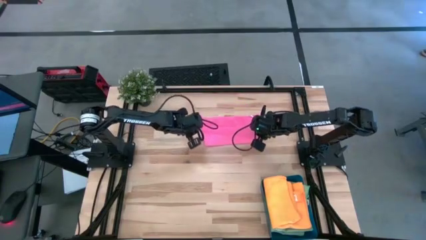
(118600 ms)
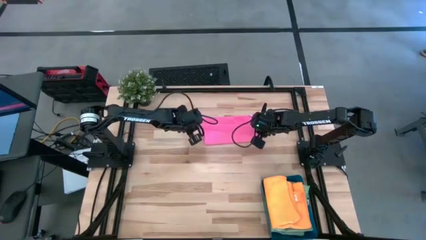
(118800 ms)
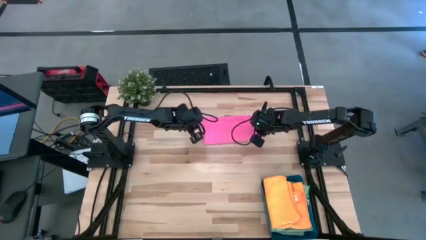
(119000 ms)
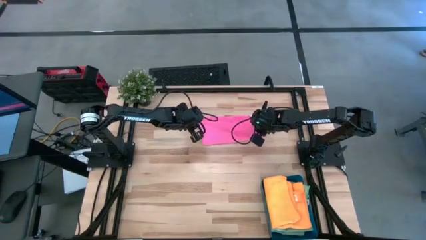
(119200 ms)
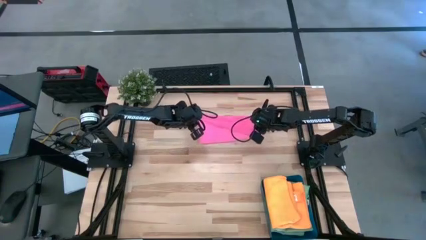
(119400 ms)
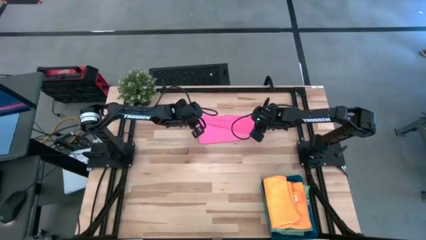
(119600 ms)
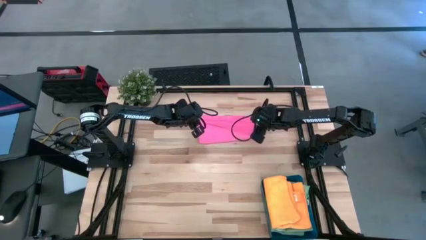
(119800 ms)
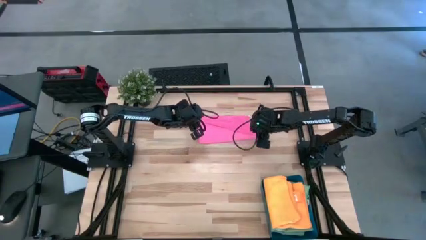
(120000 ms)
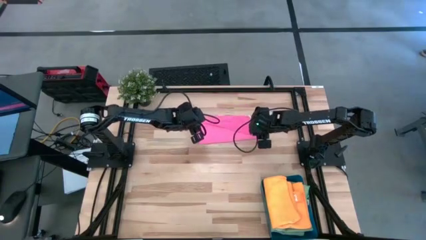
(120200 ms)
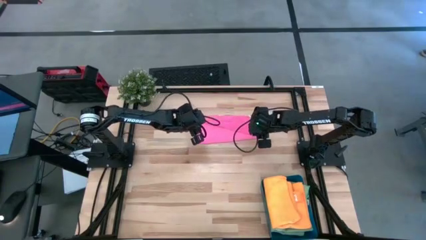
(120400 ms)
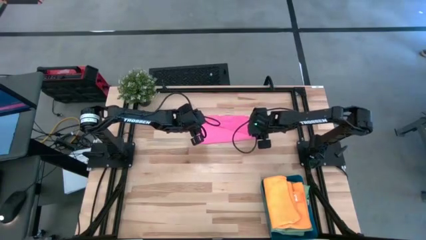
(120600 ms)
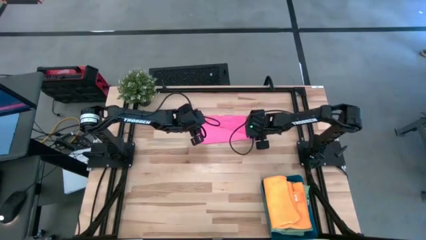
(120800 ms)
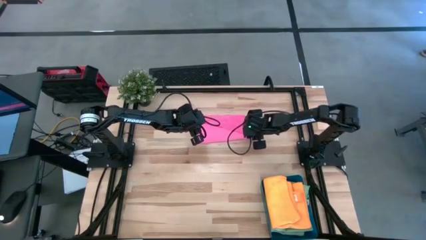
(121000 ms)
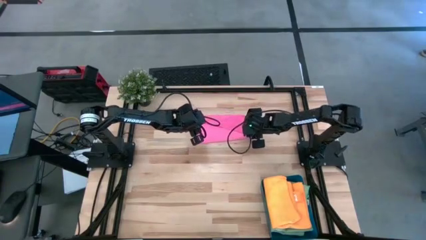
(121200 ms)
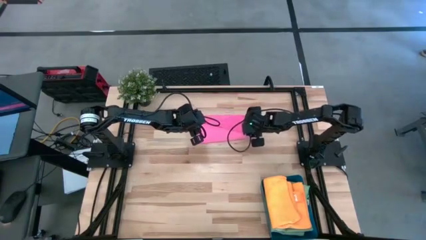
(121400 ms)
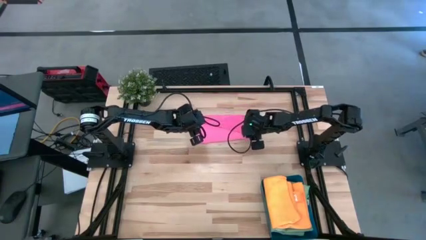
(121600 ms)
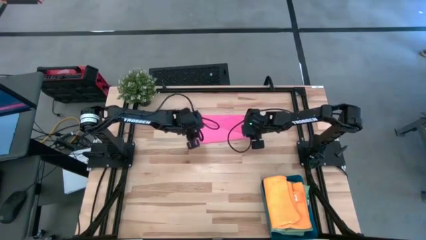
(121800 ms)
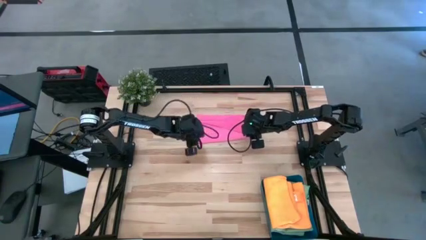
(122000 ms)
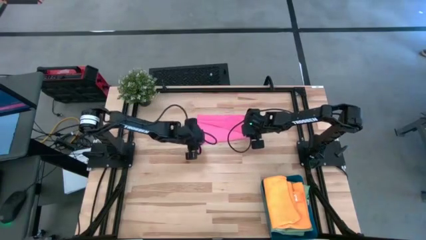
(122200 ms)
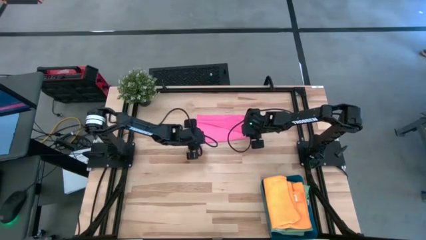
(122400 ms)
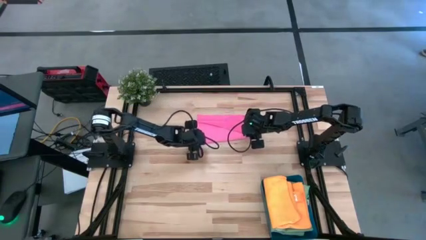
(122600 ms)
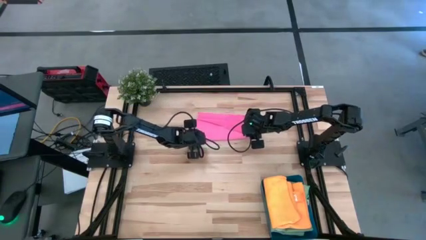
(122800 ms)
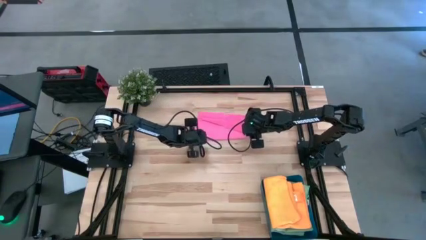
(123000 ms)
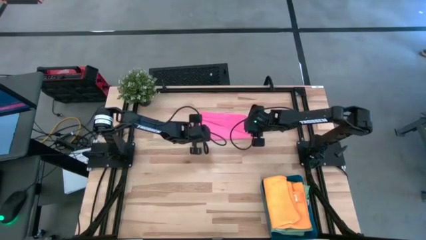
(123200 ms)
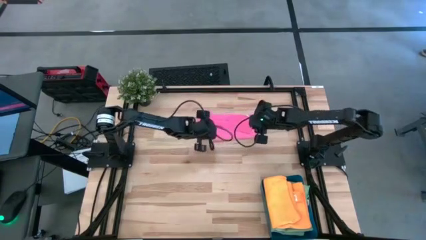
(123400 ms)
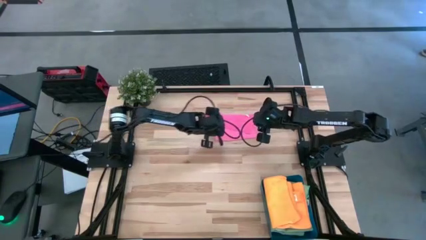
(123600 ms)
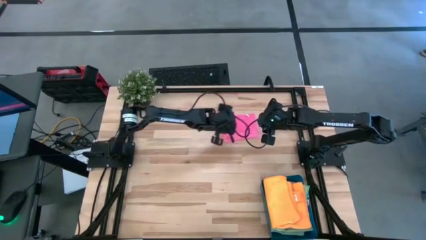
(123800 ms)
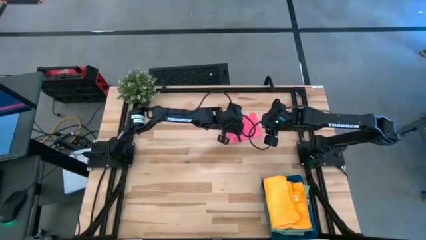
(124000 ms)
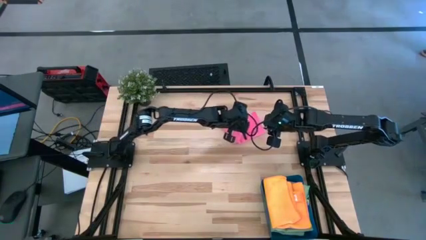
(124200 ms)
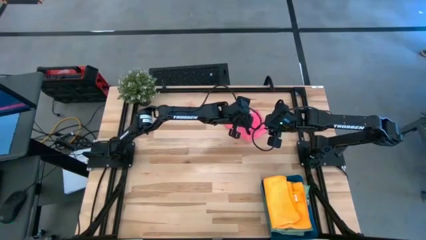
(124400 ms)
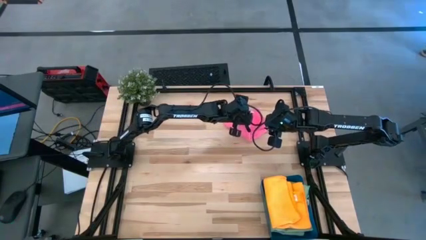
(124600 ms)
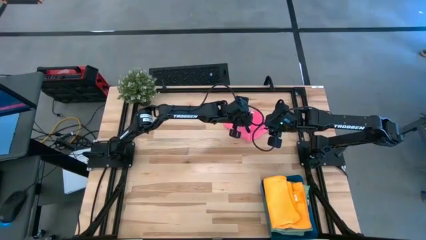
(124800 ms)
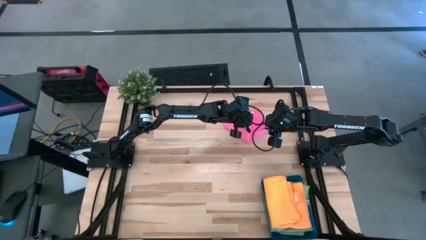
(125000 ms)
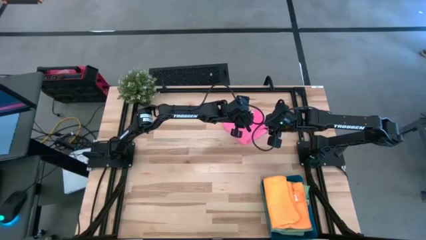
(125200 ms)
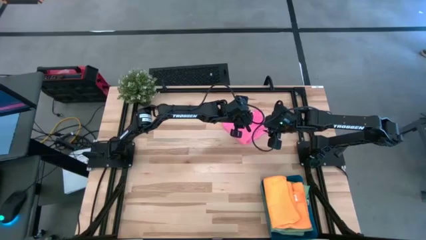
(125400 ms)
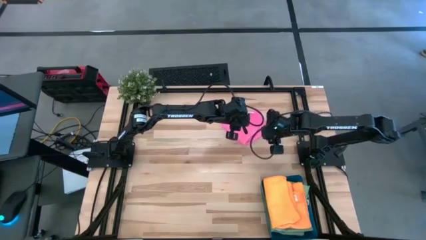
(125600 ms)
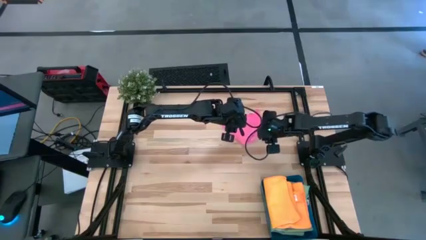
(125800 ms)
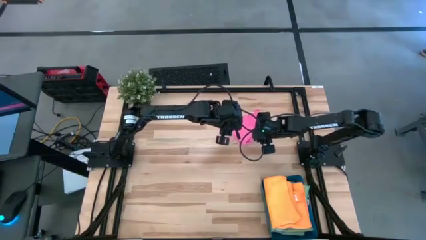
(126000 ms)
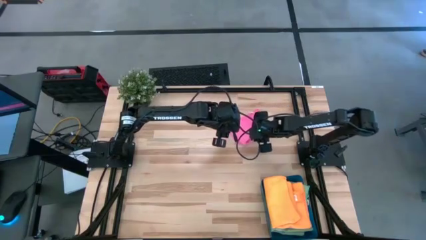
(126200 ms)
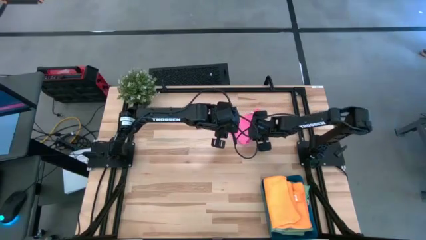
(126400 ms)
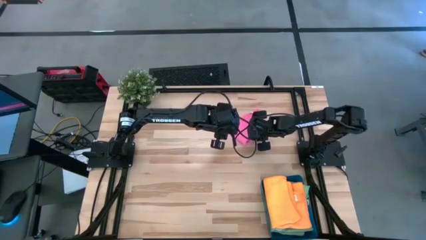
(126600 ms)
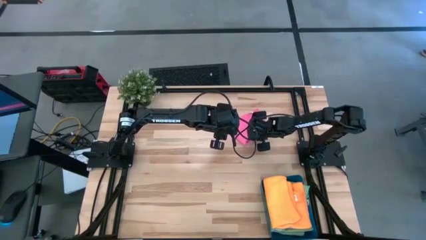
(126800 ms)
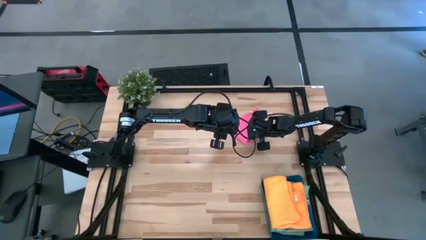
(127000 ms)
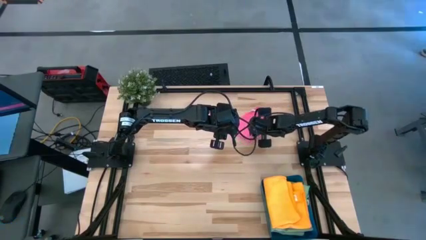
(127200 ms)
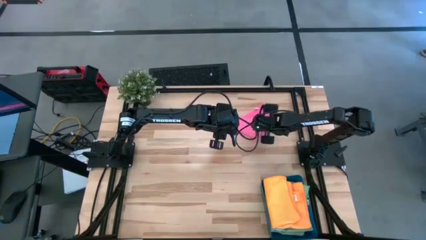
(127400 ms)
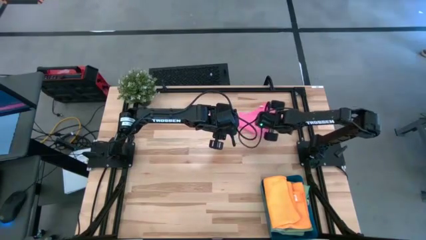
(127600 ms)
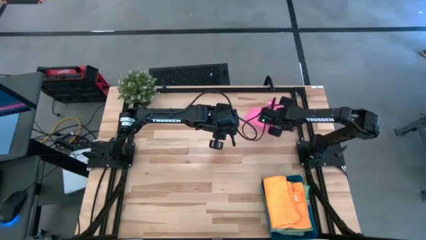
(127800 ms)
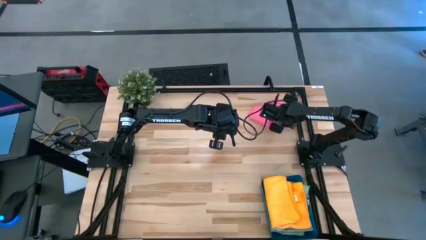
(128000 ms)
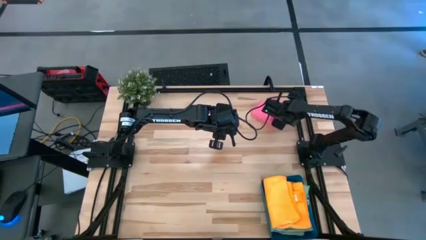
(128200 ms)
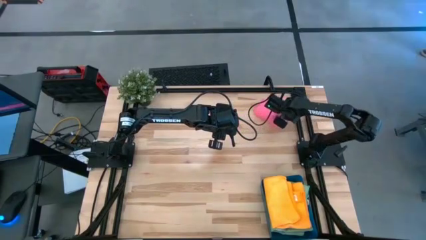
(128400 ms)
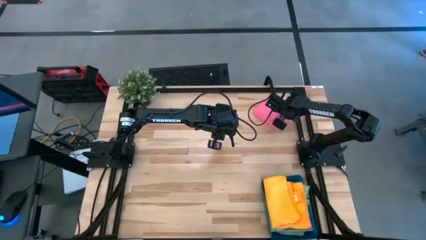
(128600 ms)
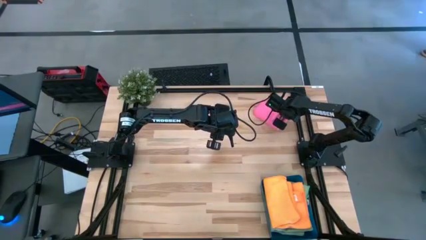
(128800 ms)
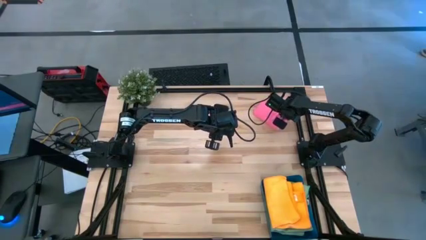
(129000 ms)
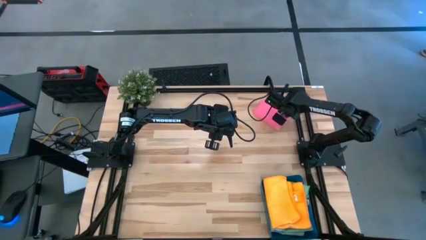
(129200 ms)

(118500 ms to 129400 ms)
Task: Fold microfiber towels
Fold the pink microfiber towel

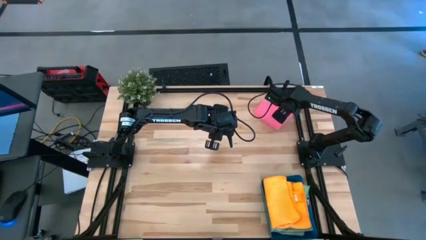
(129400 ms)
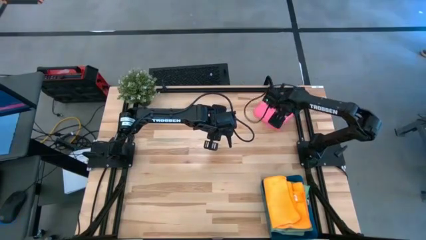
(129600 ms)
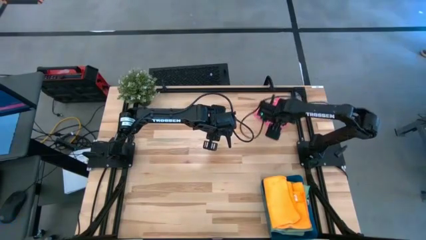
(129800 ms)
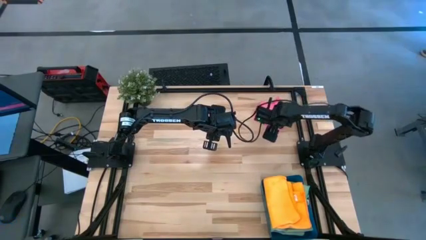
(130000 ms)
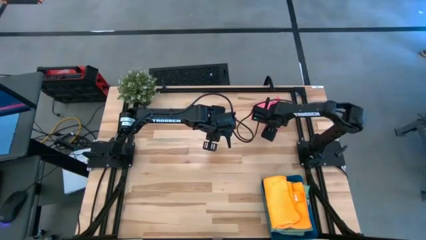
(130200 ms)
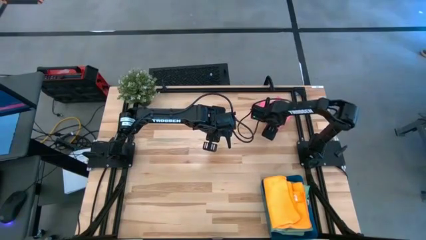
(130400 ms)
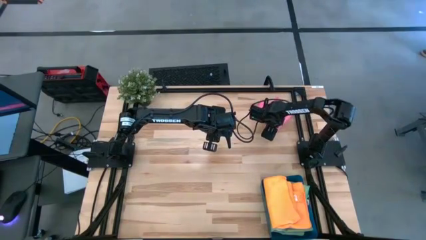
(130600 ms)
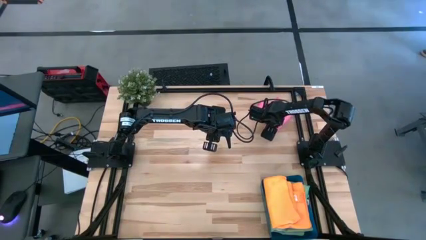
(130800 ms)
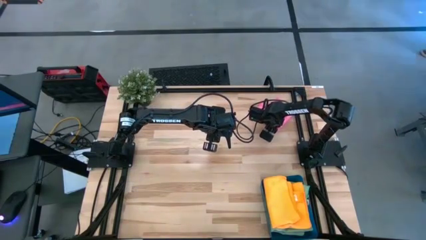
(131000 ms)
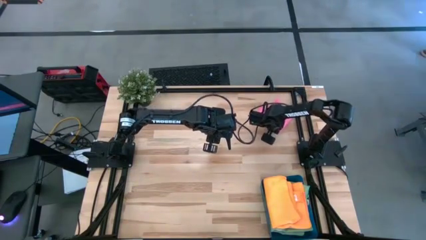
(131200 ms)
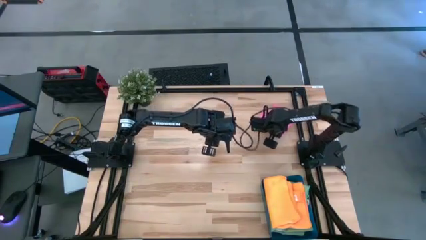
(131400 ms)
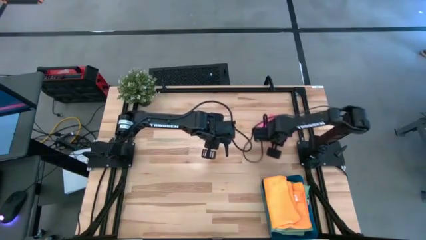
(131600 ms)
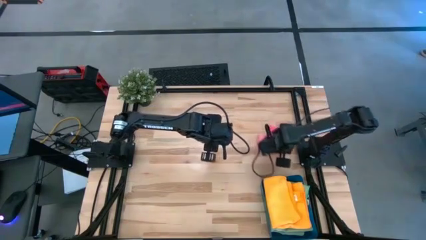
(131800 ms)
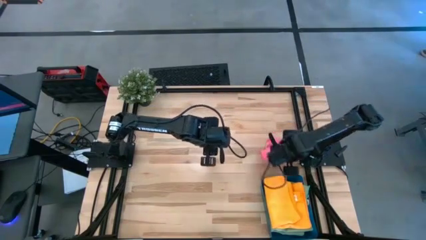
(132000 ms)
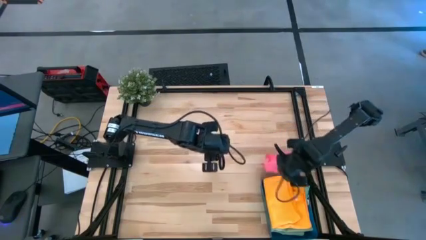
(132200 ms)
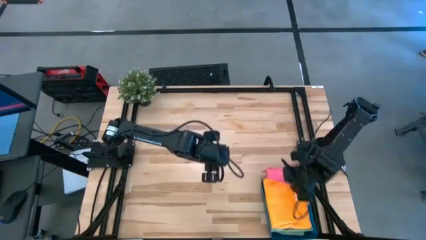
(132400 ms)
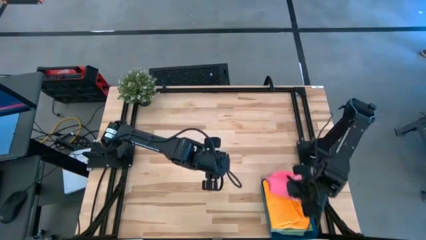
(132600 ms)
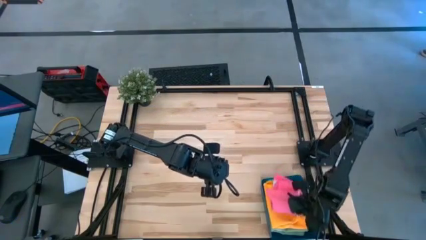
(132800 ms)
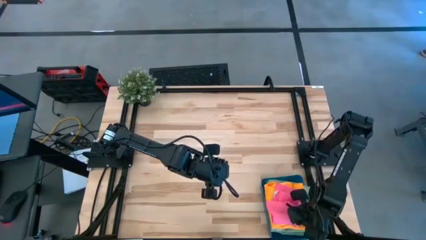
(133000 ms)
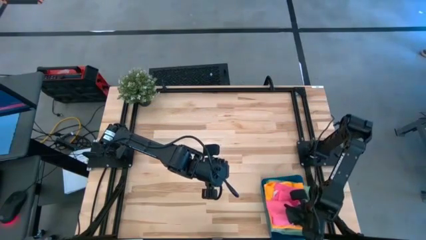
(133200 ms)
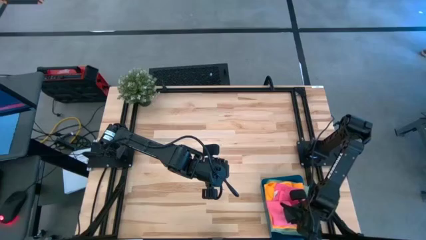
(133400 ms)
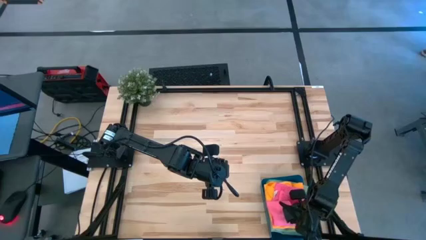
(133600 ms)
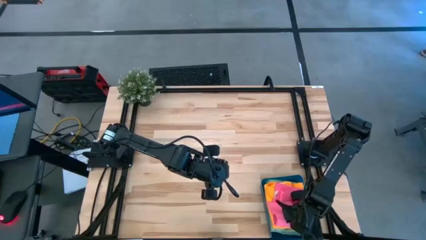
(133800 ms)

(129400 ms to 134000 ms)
Put the folded pink microfiber towel into the blue bin

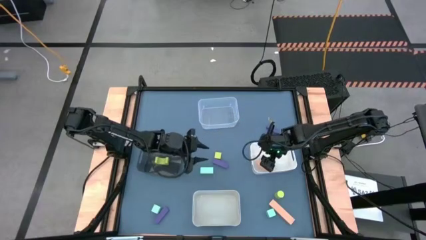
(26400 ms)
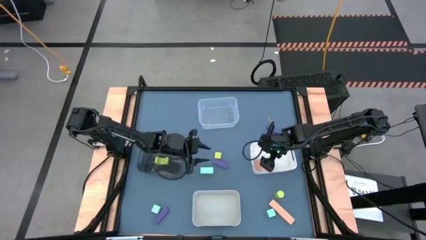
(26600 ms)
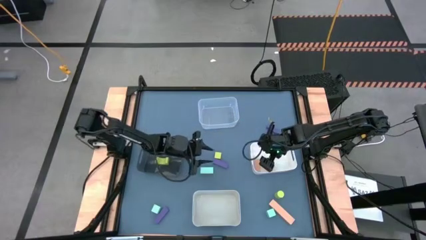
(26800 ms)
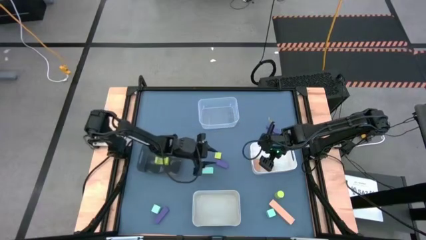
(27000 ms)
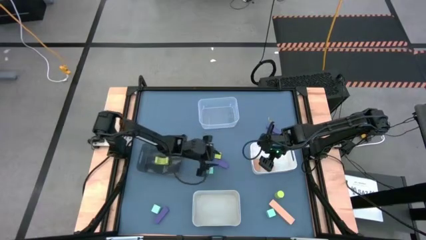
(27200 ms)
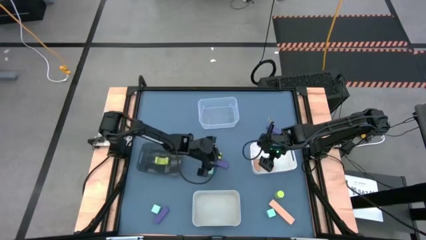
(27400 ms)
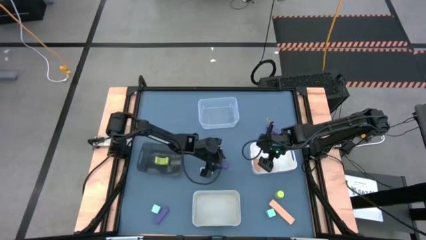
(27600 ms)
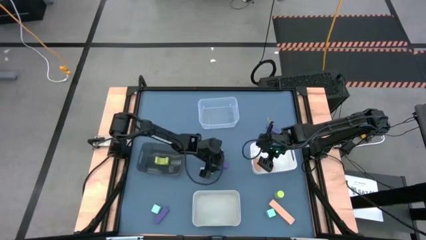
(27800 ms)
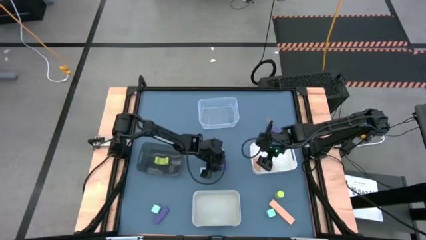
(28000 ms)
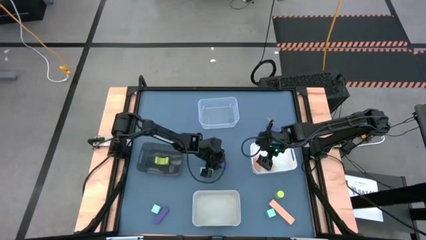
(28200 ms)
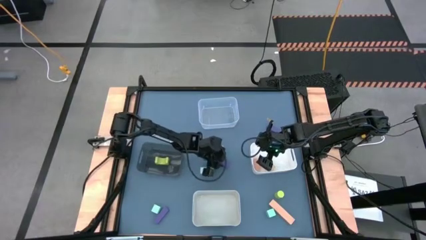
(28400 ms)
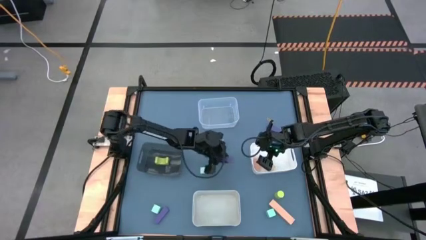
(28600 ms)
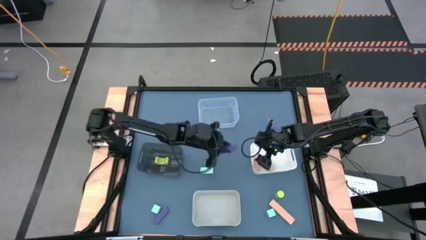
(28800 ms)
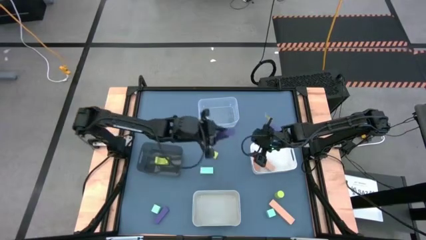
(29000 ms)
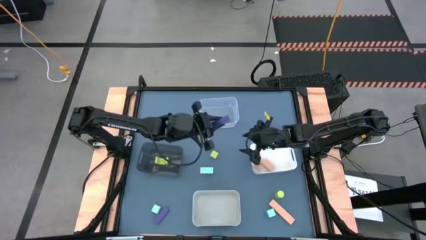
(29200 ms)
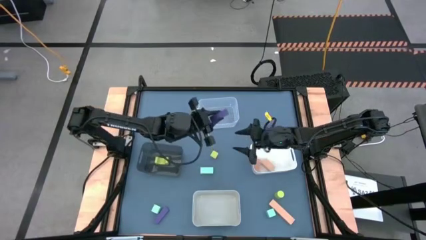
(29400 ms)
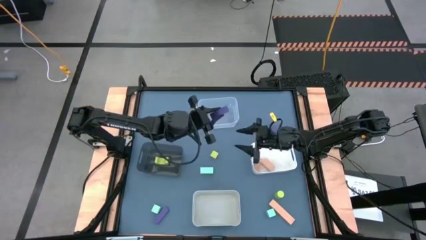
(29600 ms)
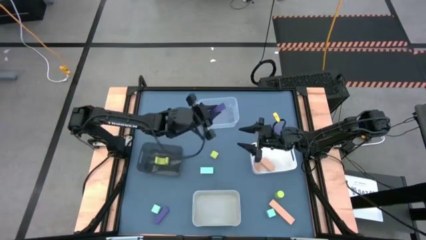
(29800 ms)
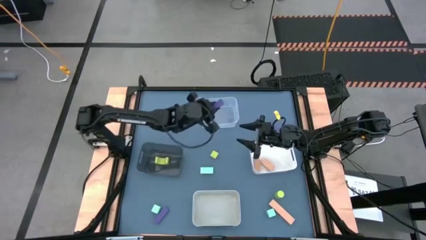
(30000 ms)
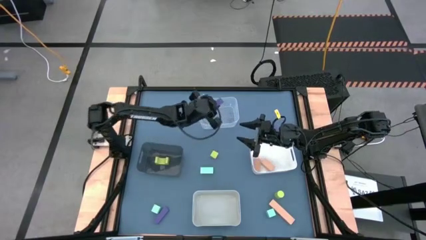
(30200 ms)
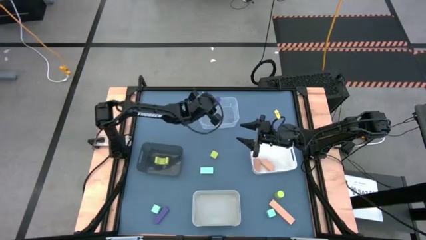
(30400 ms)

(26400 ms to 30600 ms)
Task: Sort & place blocks by color
Put the middle violet block into the transparent bin
